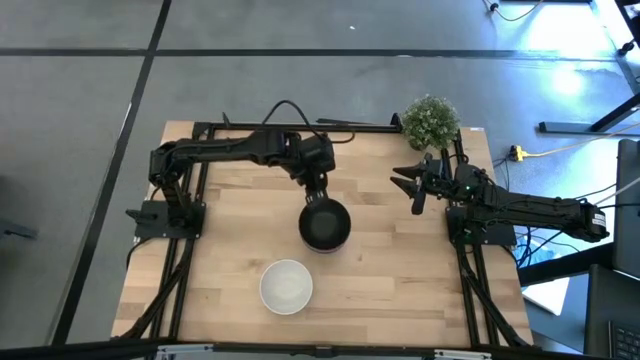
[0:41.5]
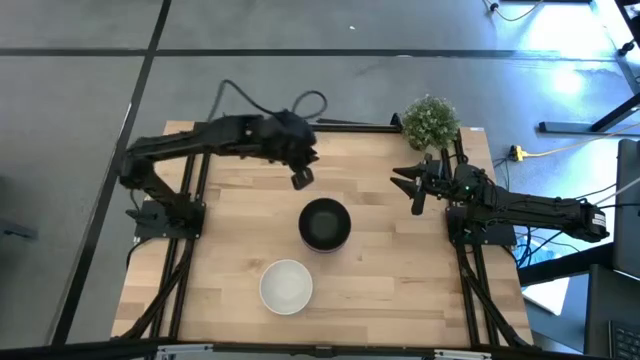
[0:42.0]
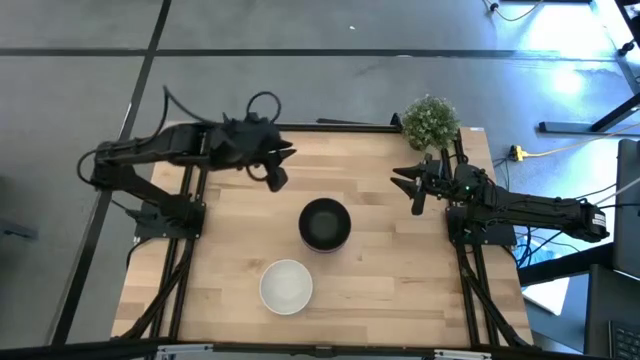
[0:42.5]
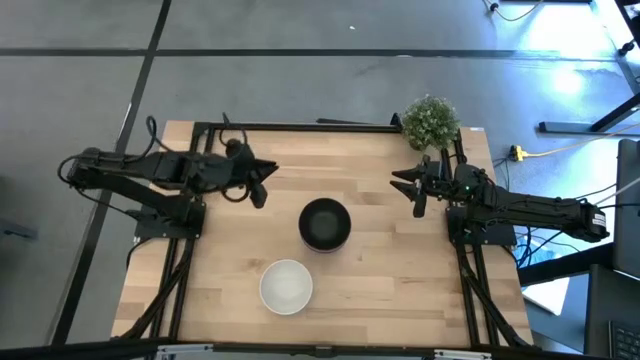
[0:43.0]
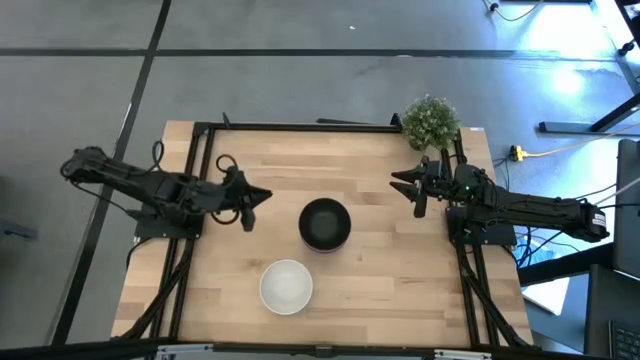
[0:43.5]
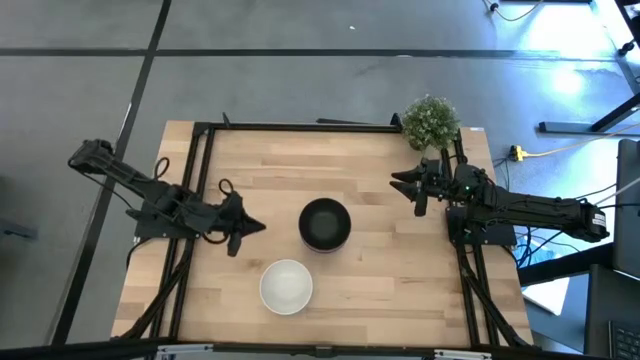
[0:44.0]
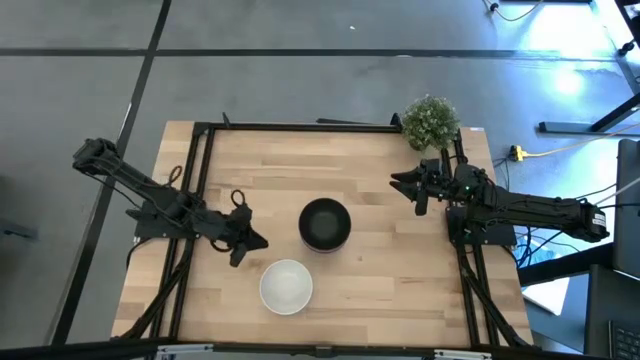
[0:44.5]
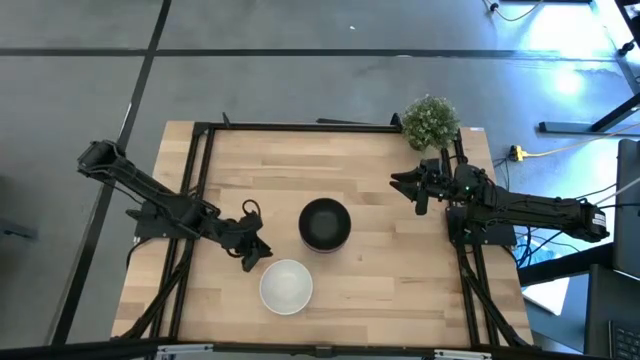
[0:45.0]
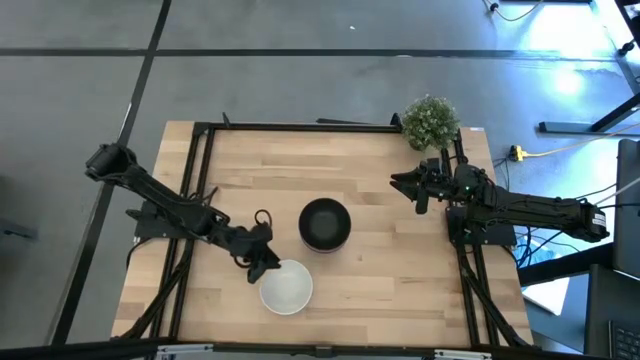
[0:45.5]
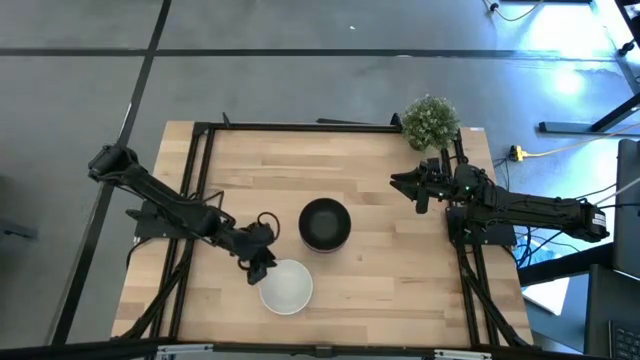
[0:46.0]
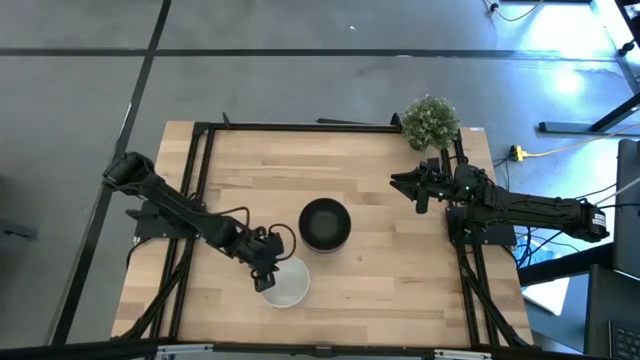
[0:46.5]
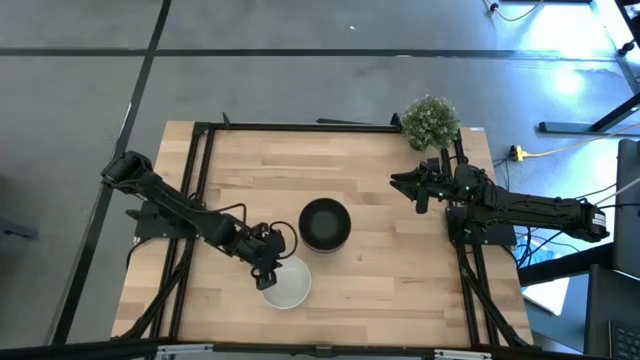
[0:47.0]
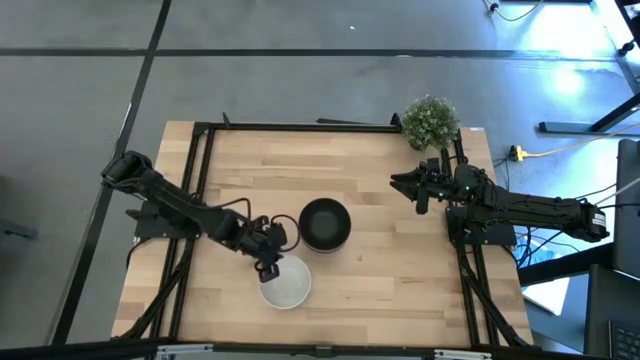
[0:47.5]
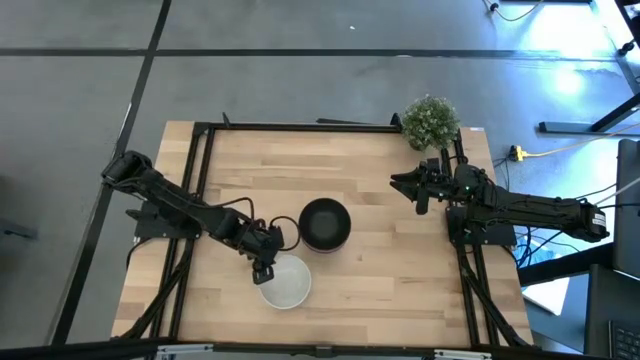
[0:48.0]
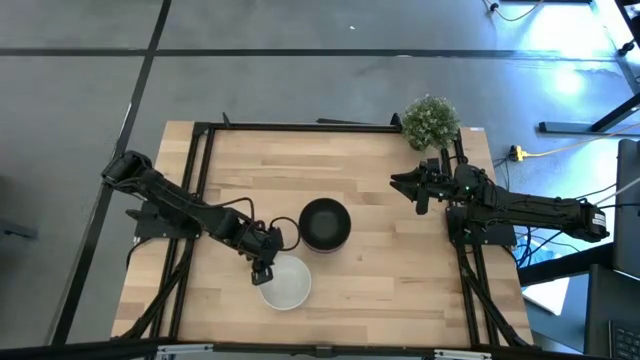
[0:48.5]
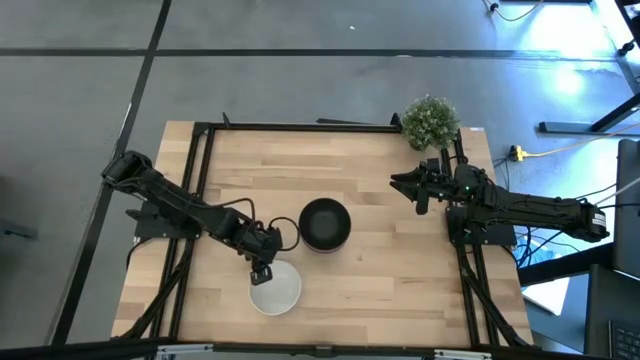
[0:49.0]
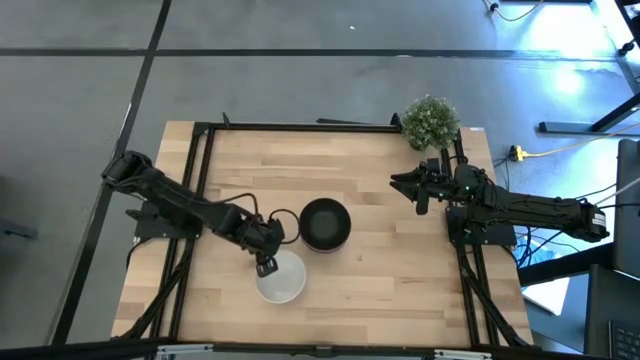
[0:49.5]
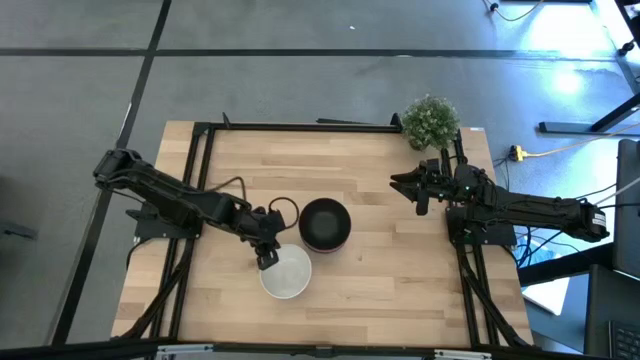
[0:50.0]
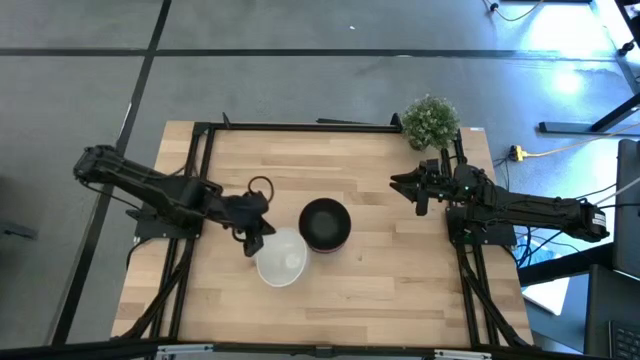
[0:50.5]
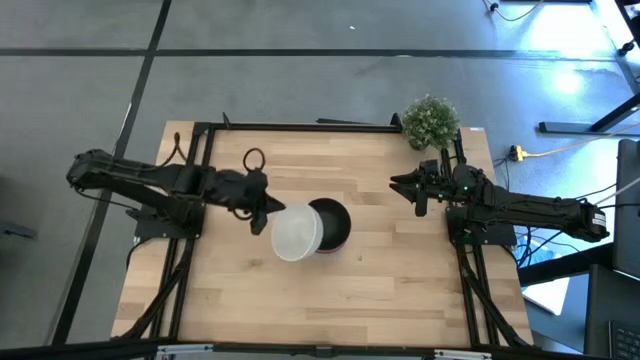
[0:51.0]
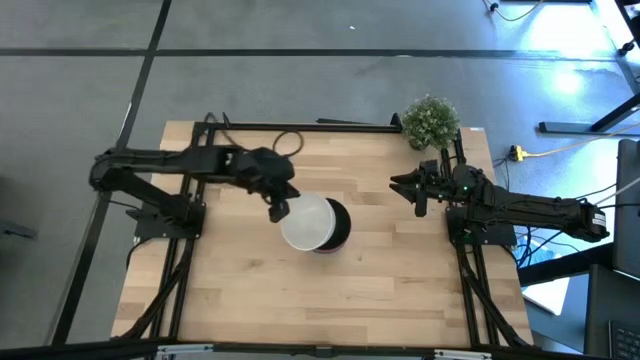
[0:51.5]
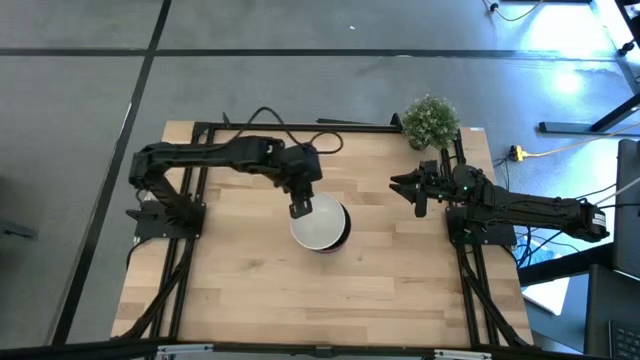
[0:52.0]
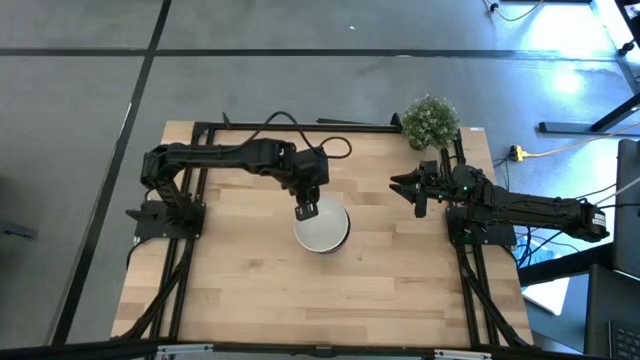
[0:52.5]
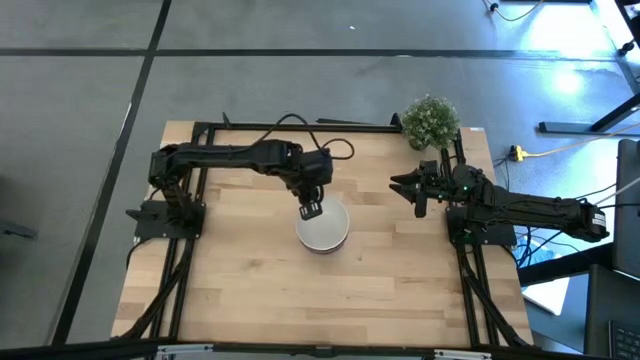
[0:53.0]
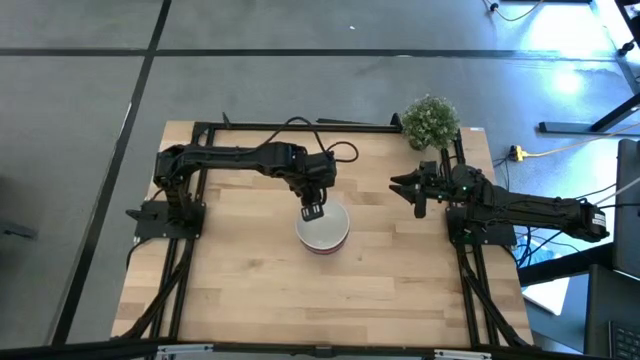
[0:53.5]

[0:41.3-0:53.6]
Task: Nest bowls inside each other
Stack the white bowl on top of the black bowl

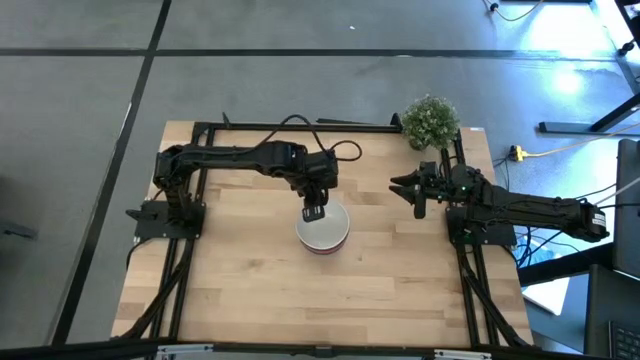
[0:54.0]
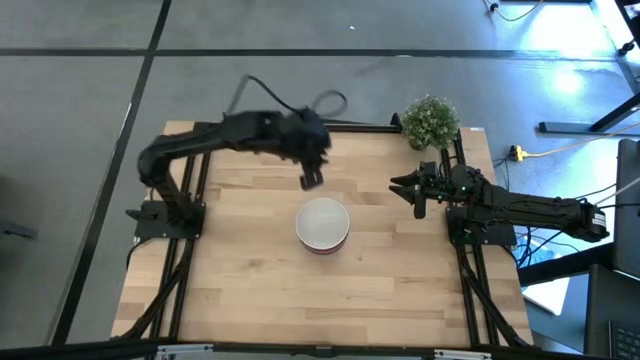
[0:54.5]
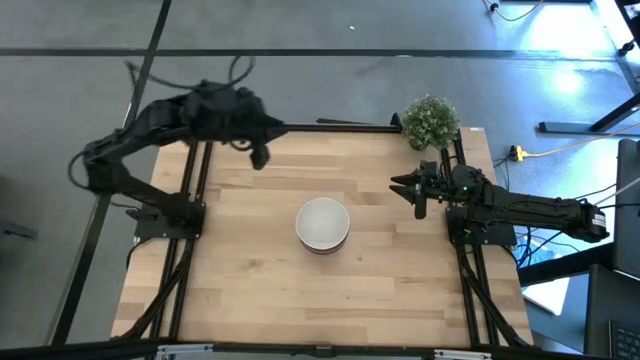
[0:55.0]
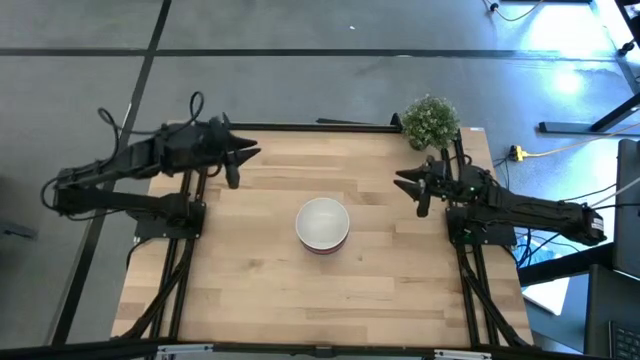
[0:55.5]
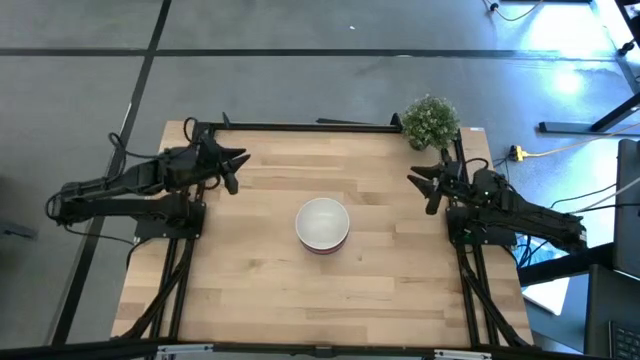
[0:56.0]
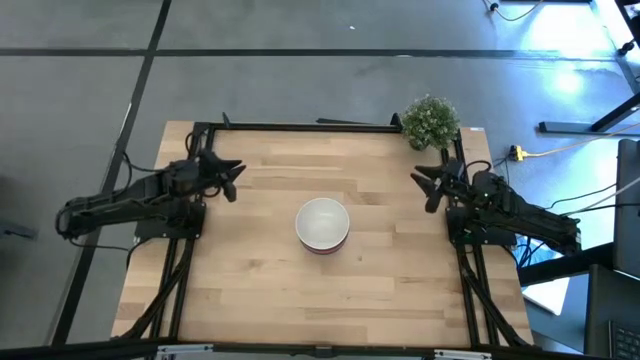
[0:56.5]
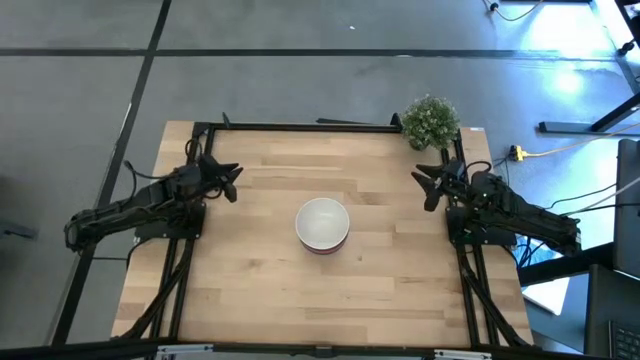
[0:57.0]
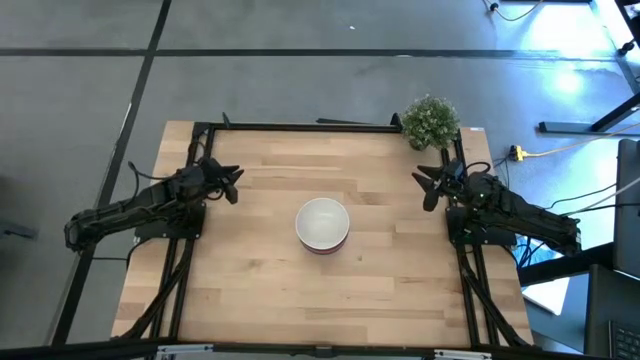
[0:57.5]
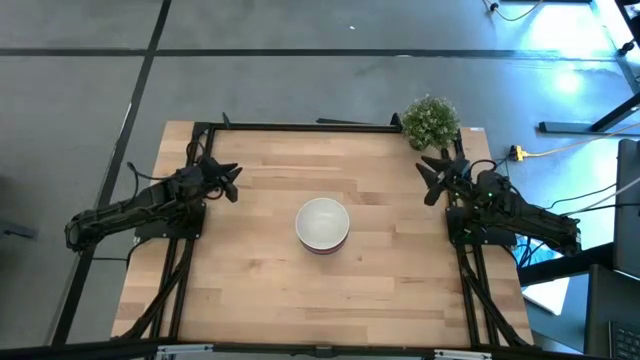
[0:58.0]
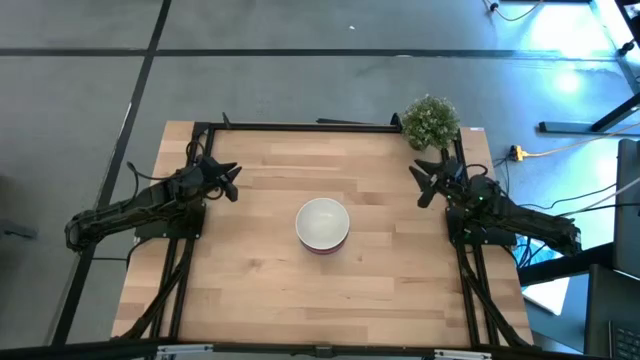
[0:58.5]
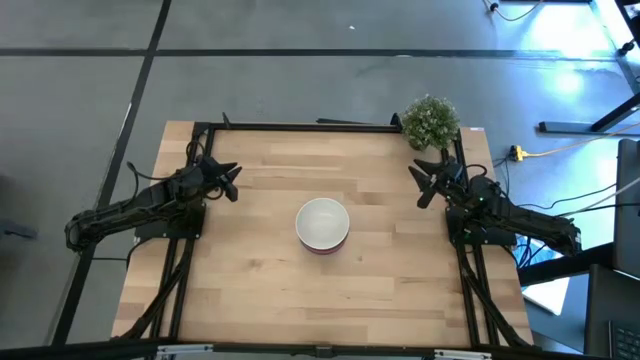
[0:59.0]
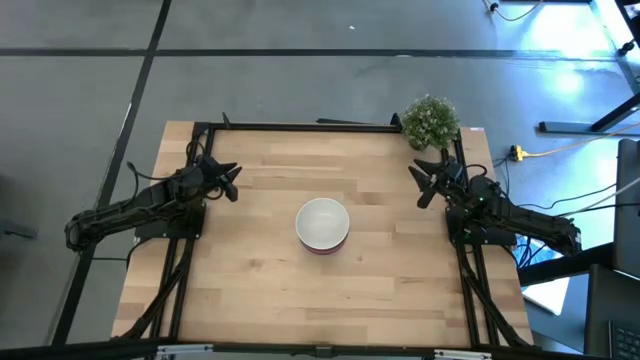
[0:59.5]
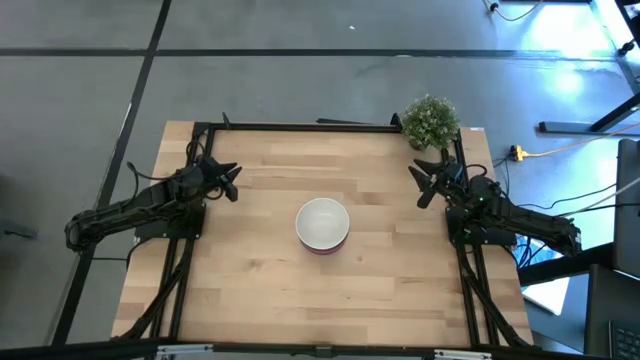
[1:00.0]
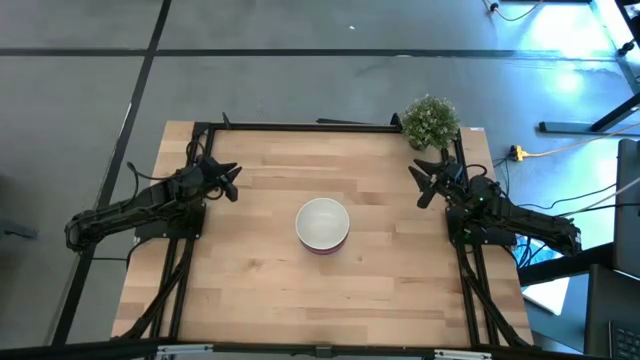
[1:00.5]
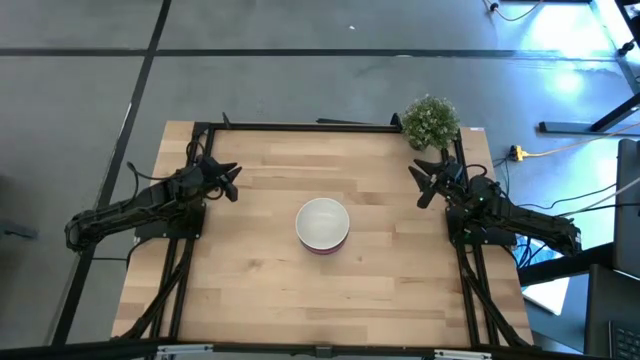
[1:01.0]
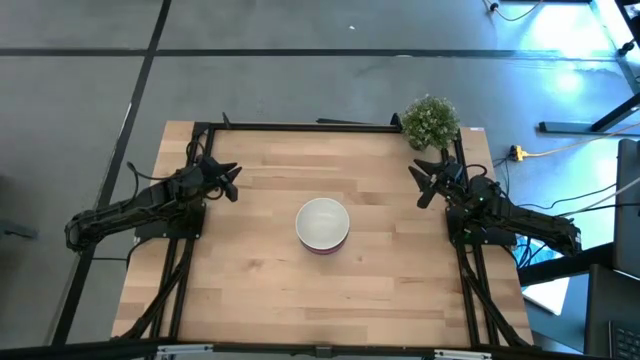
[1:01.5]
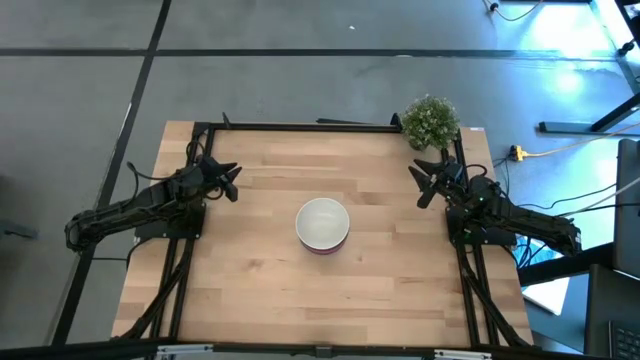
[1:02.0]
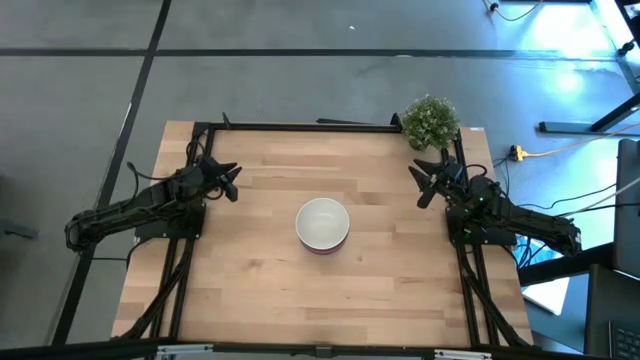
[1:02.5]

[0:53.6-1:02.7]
Return to Home Position
